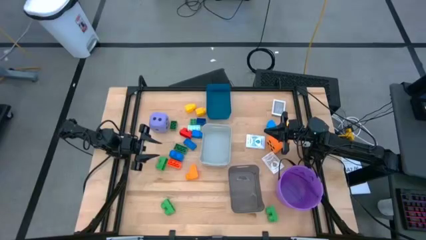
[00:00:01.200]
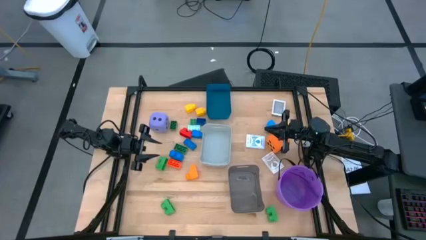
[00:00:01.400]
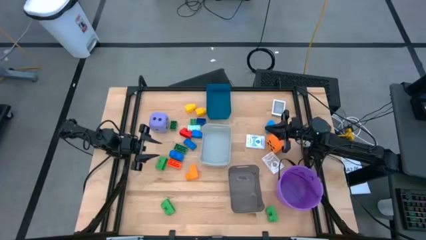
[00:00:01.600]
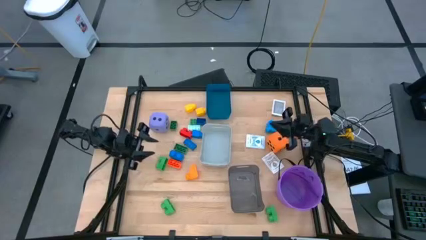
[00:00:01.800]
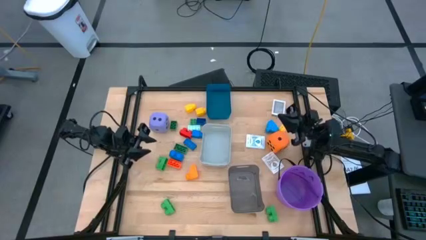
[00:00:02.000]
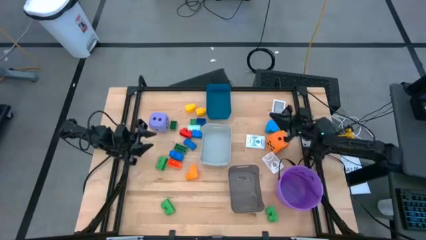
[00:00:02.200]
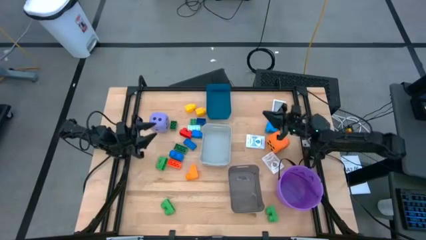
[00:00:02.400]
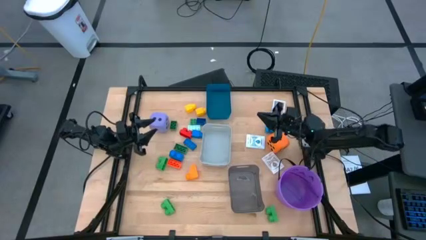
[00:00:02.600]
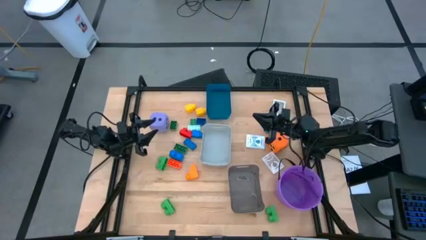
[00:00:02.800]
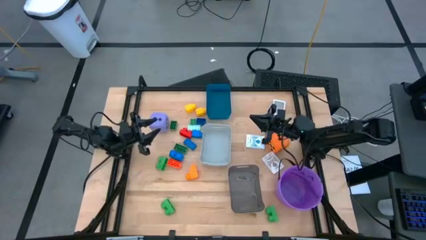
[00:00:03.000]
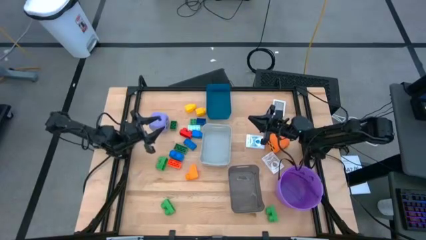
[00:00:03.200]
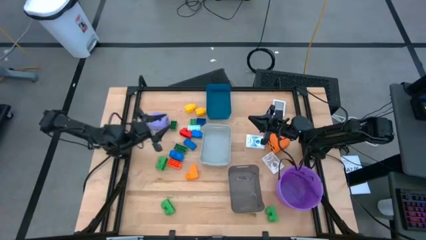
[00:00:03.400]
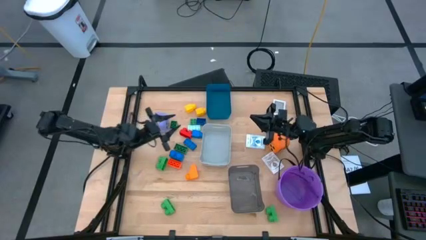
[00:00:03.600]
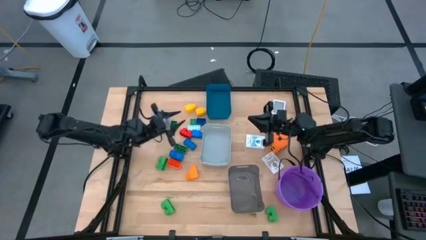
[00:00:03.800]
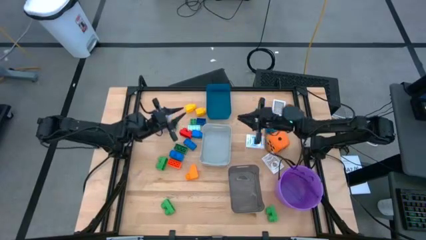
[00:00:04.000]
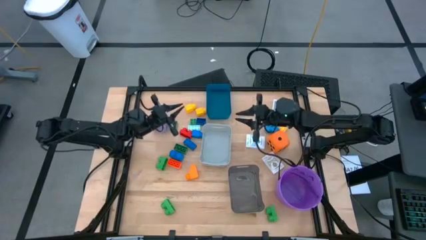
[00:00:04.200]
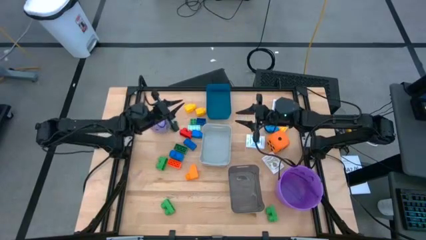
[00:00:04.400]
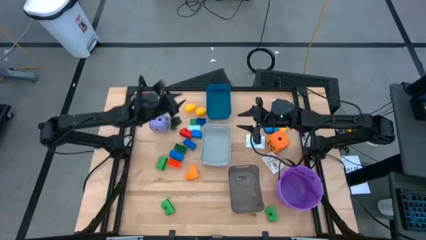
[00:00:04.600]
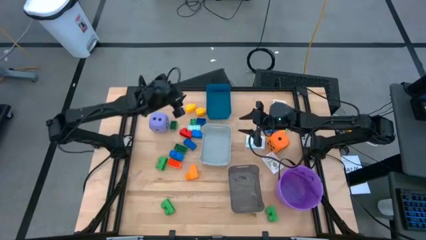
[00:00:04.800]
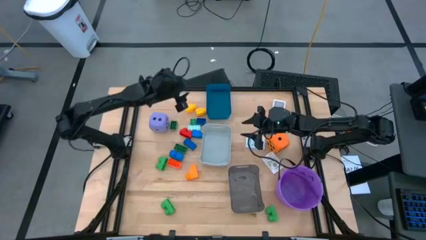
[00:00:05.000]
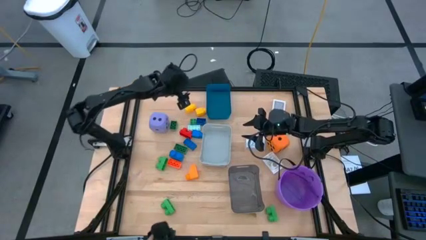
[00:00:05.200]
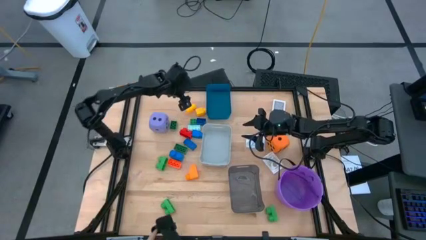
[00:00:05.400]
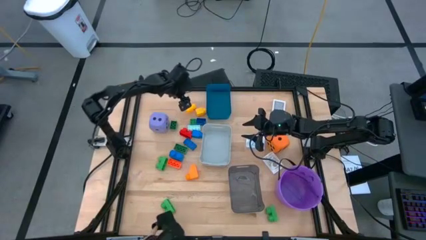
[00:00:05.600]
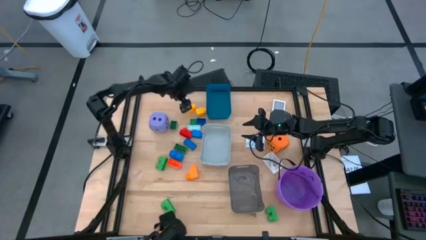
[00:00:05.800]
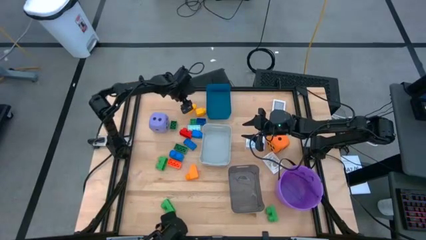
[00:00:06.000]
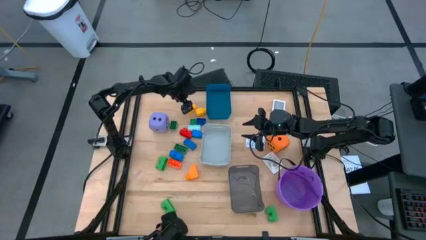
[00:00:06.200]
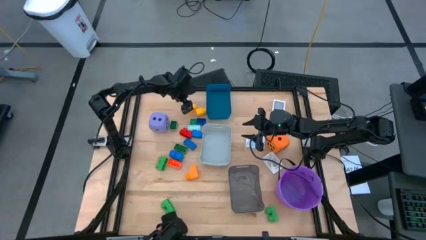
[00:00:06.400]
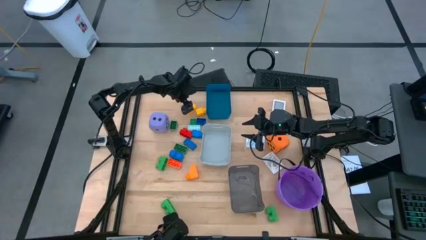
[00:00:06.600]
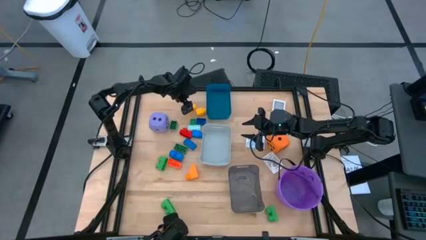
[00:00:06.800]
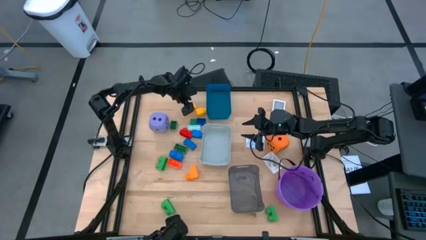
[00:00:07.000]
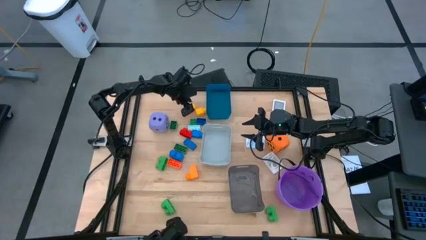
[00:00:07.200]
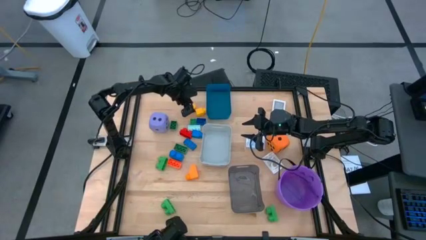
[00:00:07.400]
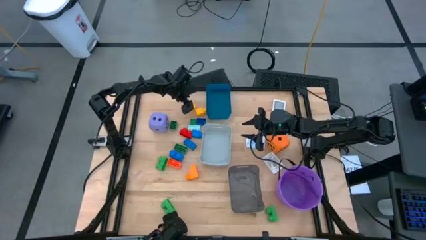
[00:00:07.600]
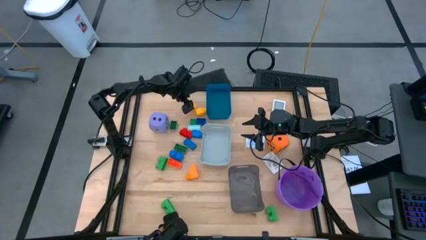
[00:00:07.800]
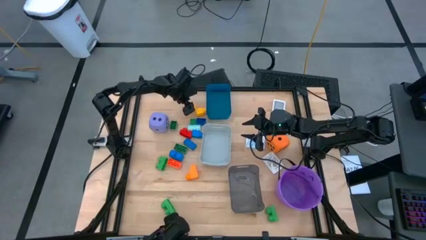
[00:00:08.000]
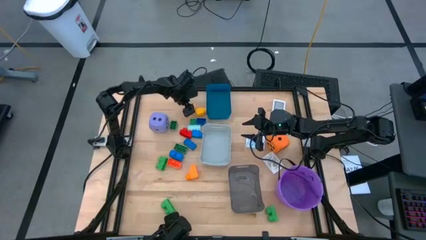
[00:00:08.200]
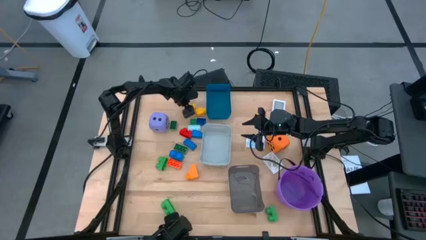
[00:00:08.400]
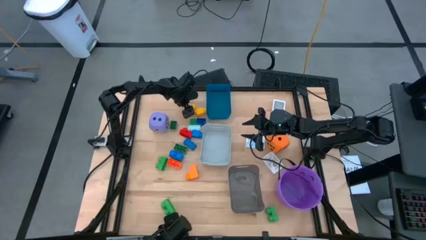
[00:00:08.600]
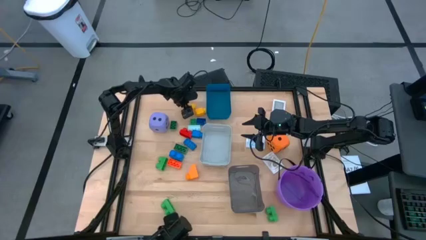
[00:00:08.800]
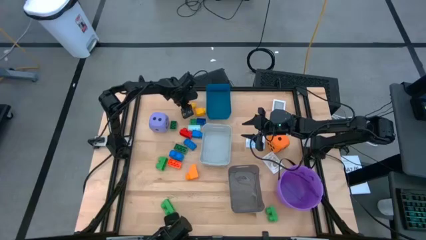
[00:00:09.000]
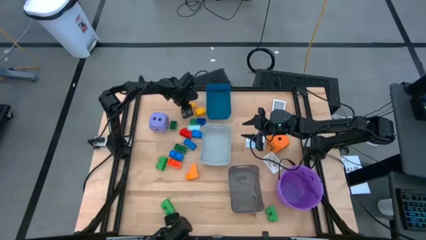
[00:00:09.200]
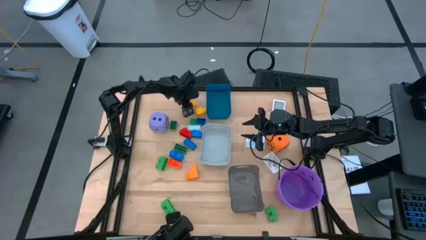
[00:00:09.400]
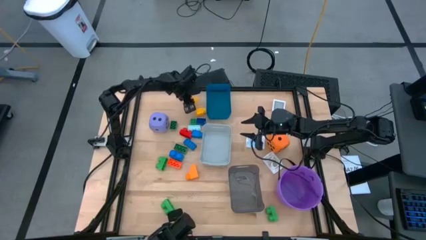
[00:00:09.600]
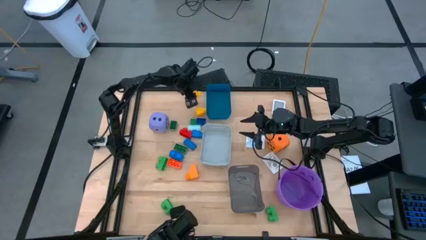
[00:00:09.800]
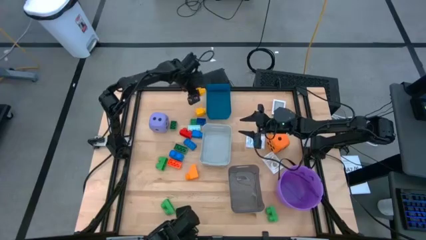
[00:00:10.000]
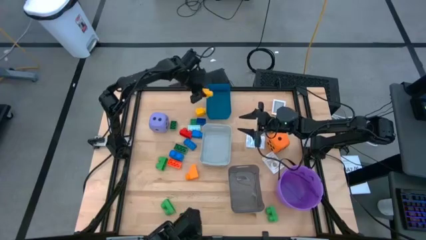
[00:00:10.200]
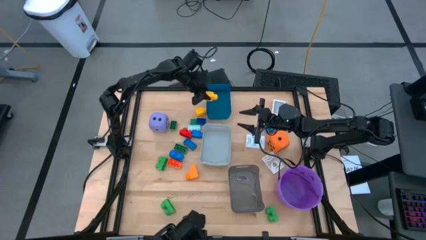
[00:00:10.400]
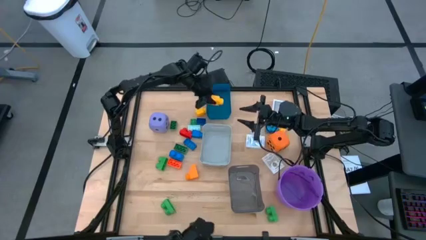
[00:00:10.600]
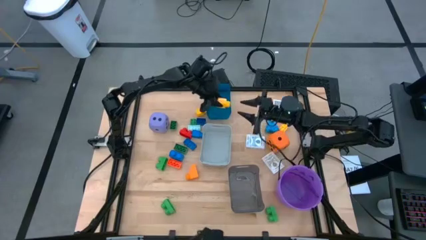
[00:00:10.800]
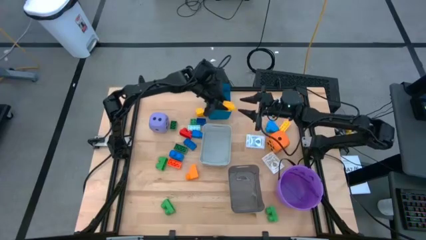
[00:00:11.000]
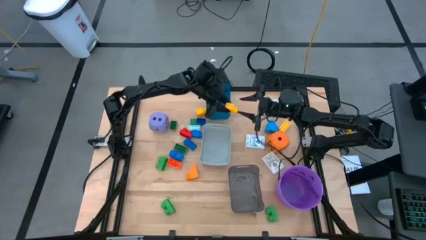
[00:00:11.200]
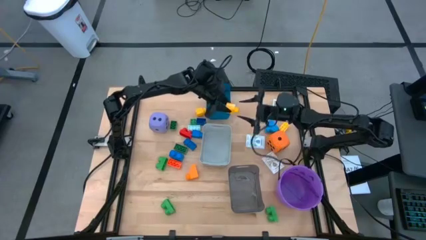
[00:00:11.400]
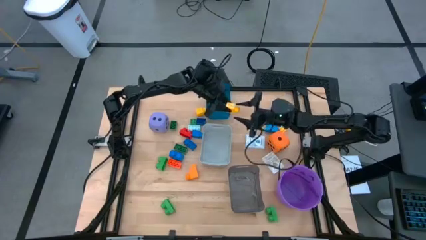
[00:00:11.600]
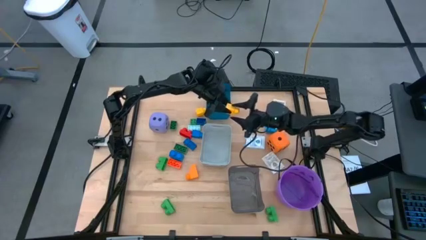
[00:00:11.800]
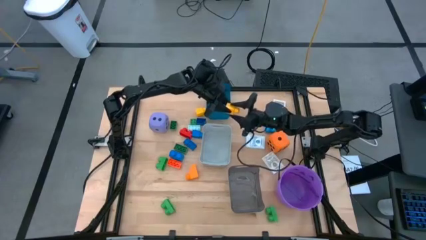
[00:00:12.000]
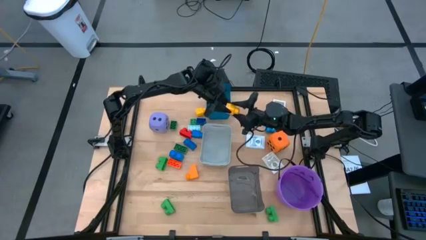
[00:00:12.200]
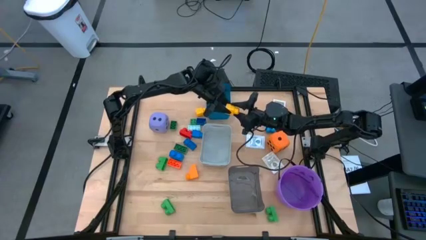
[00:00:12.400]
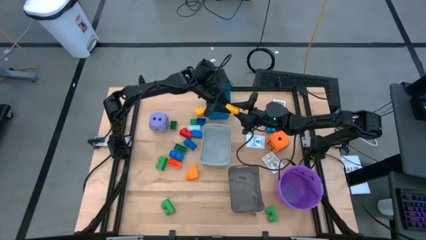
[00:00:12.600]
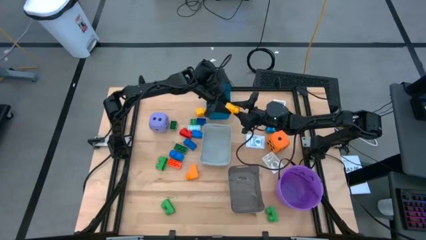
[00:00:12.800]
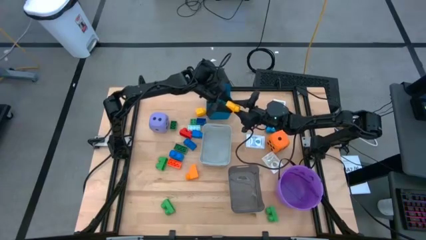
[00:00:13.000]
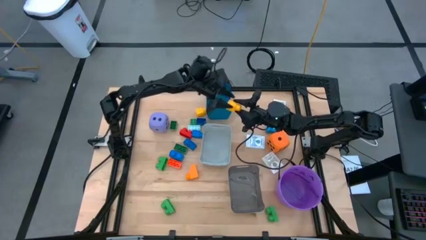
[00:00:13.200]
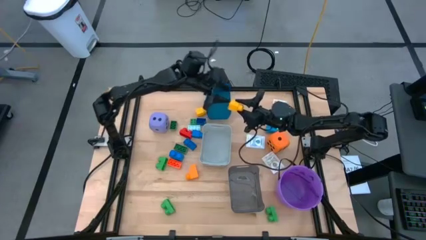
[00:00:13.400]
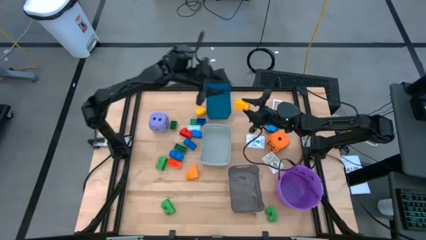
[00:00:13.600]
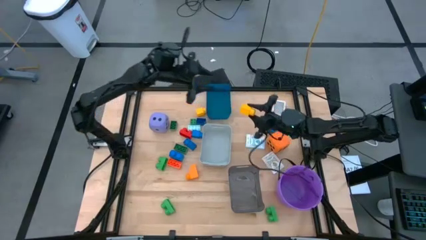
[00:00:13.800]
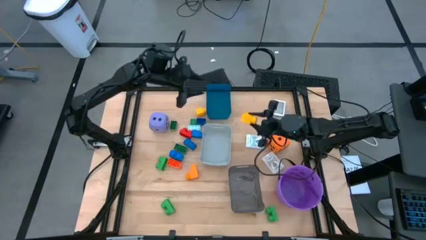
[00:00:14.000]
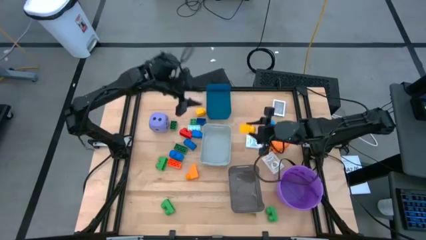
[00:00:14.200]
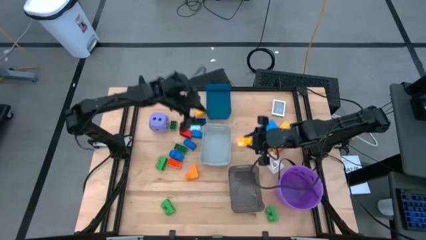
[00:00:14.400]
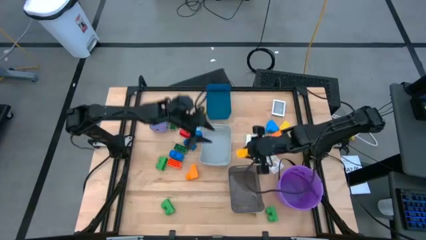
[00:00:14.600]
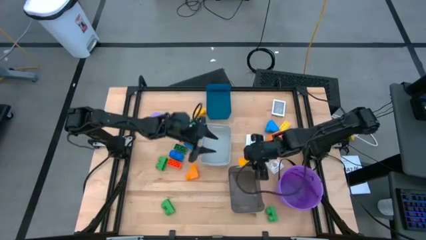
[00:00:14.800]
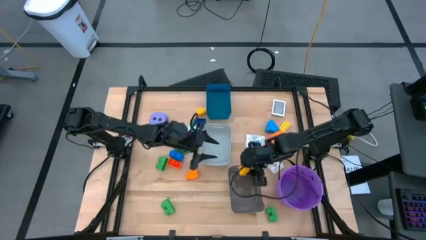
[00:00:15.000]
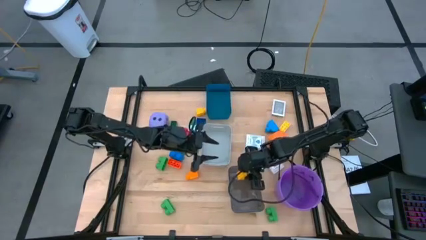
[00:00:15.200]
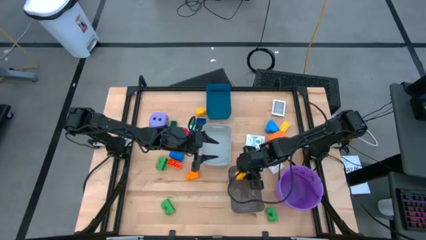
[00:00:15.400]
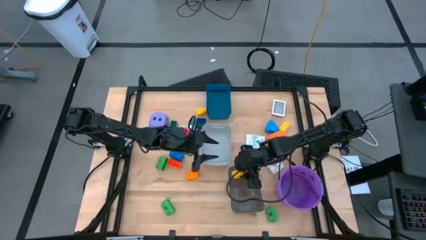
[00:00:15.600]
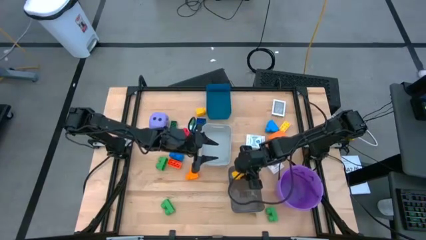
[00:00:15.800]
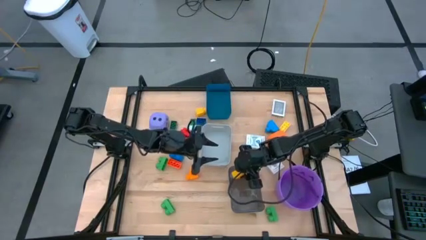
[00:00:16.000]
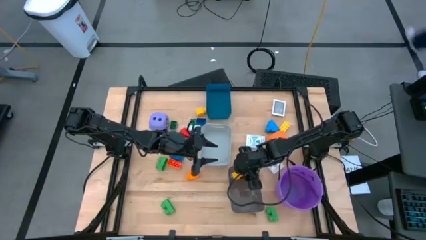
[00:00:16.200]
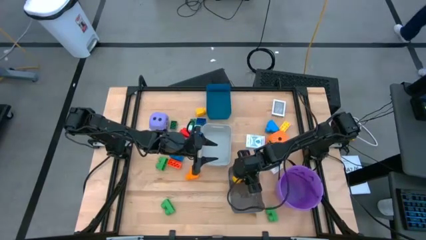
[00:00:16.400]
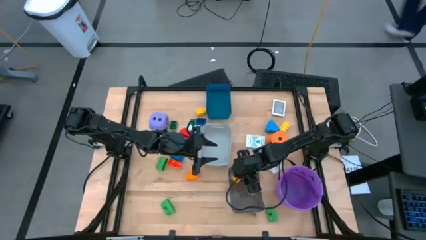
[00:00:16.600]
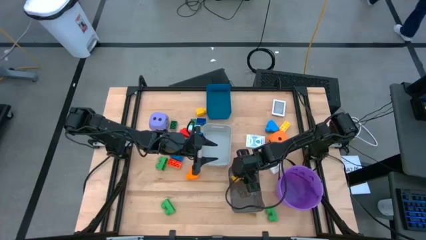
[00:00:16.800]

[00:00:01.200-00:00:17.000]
Task: Pick & Place Toys
Put the yellow game piece into the black bin
